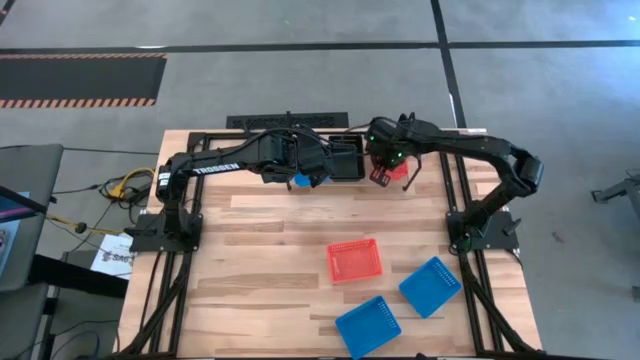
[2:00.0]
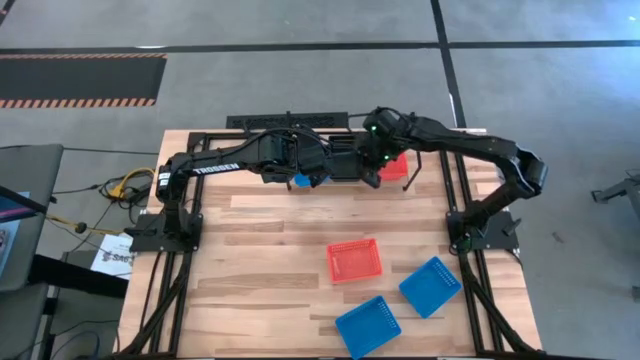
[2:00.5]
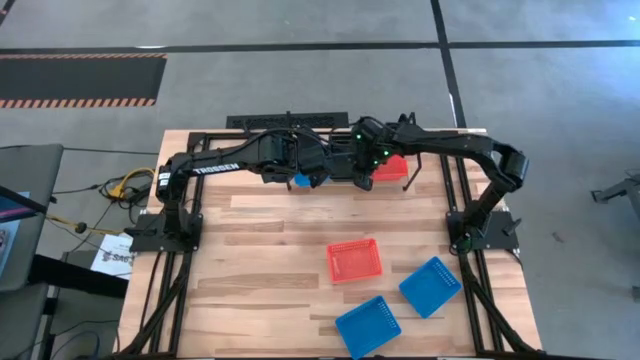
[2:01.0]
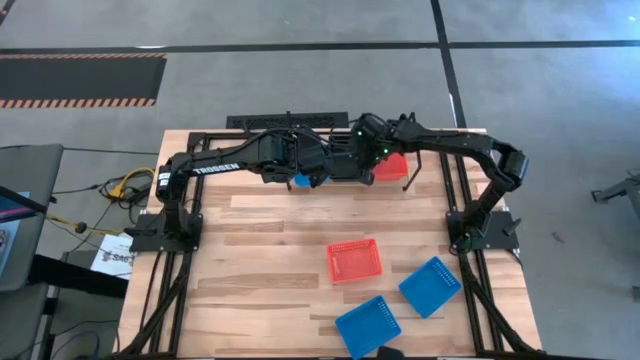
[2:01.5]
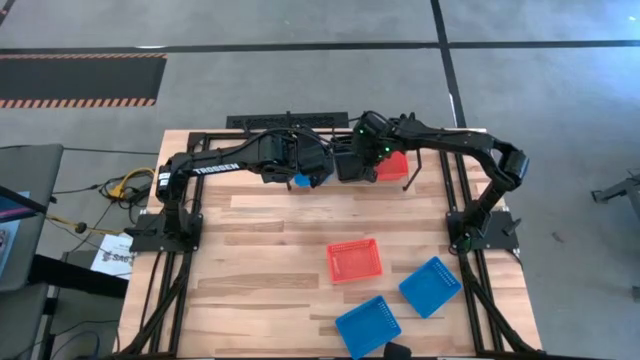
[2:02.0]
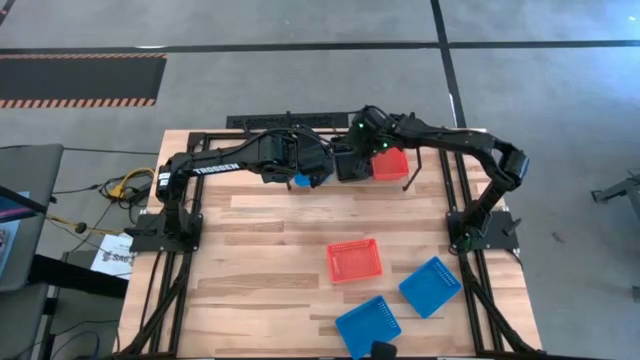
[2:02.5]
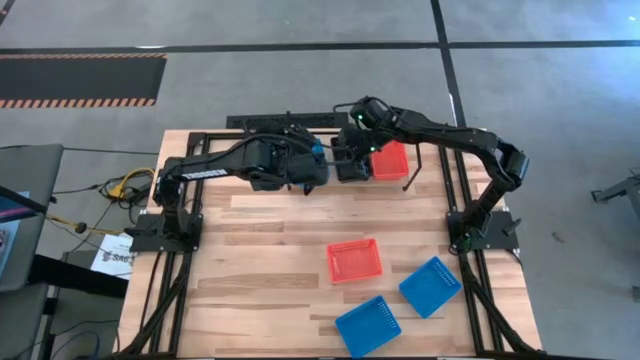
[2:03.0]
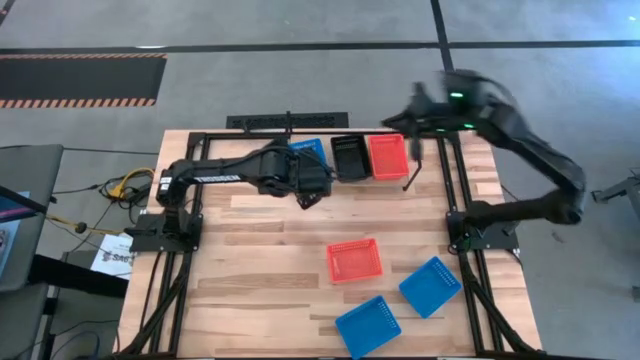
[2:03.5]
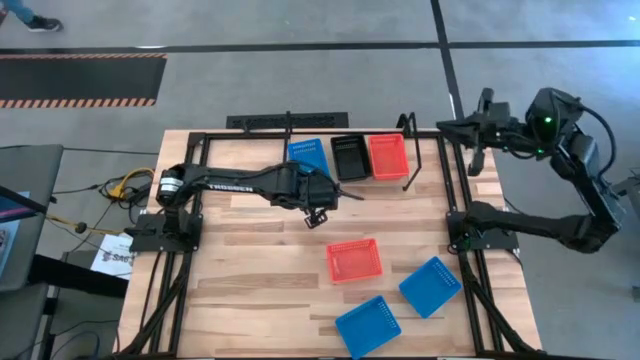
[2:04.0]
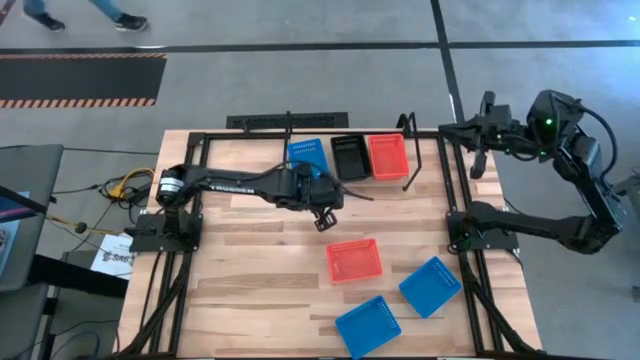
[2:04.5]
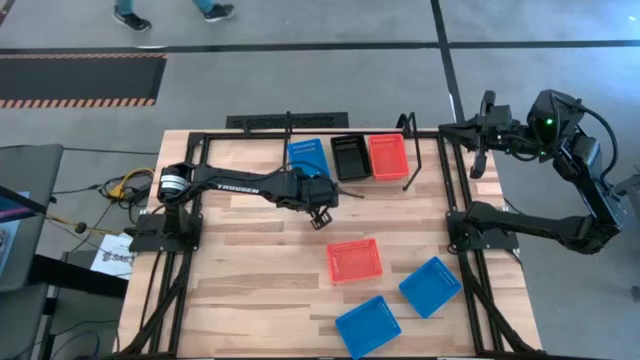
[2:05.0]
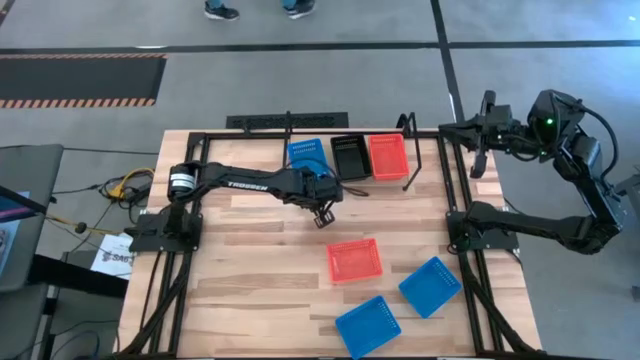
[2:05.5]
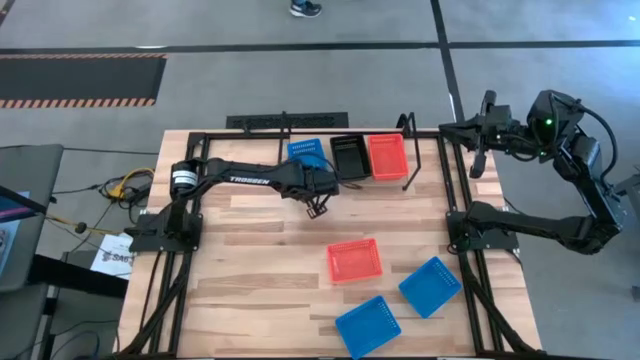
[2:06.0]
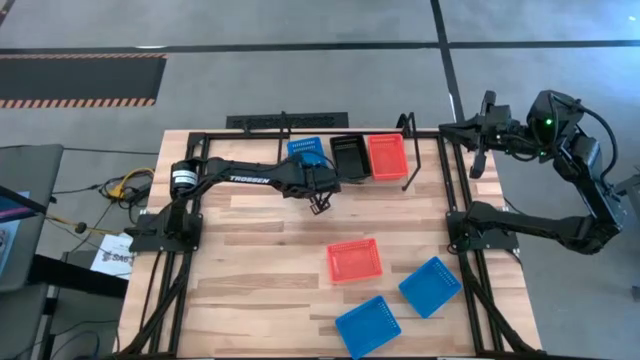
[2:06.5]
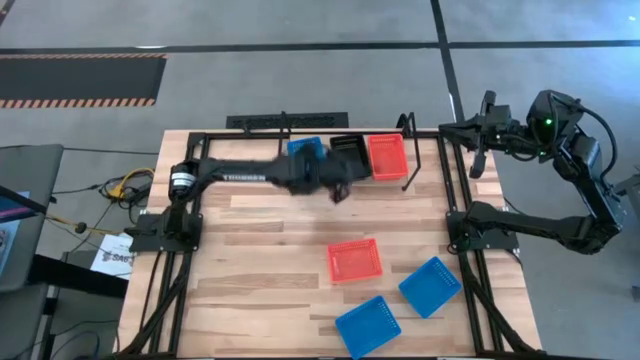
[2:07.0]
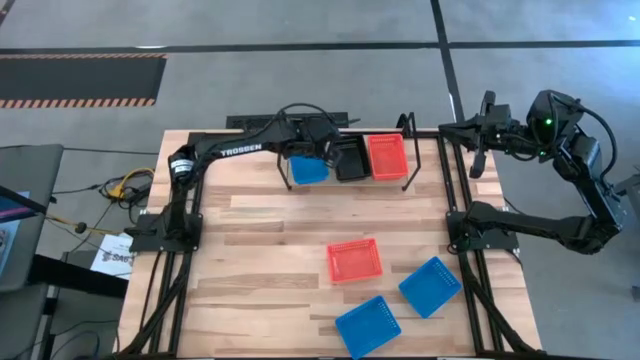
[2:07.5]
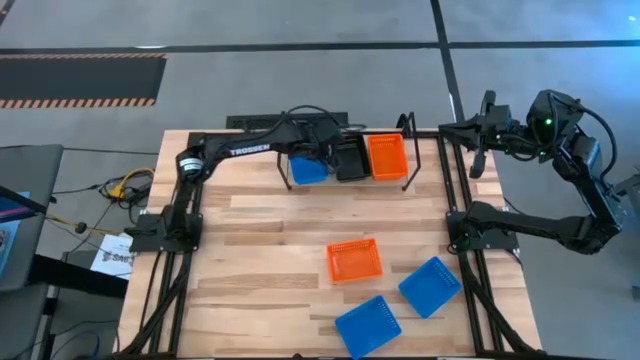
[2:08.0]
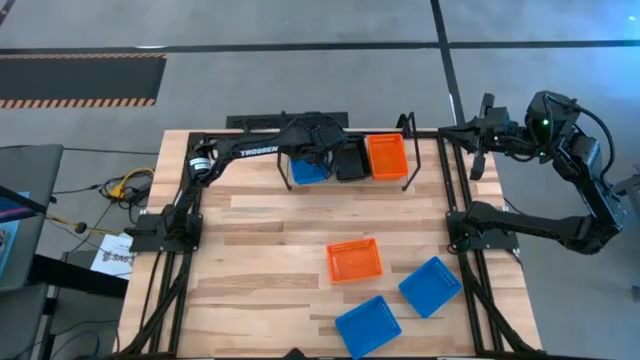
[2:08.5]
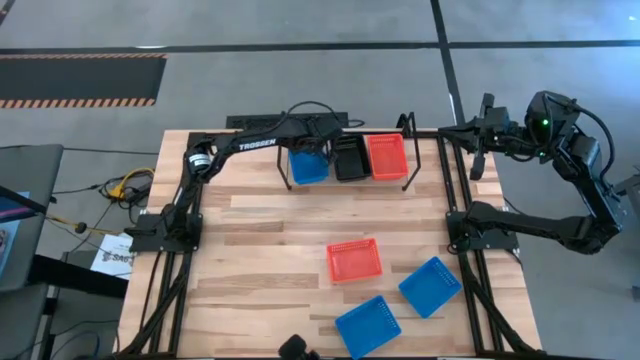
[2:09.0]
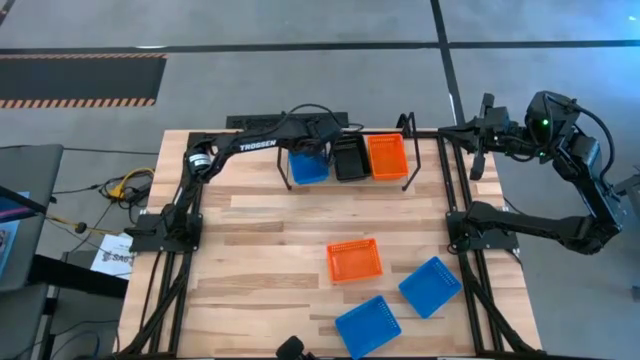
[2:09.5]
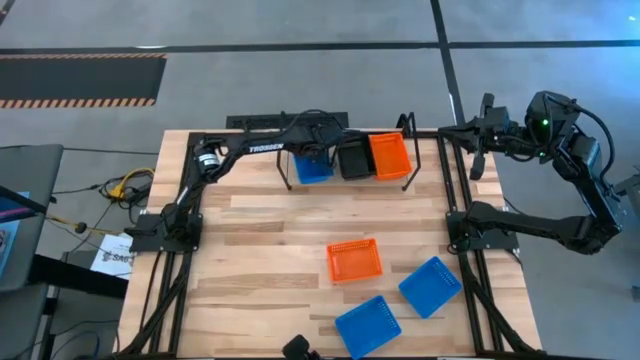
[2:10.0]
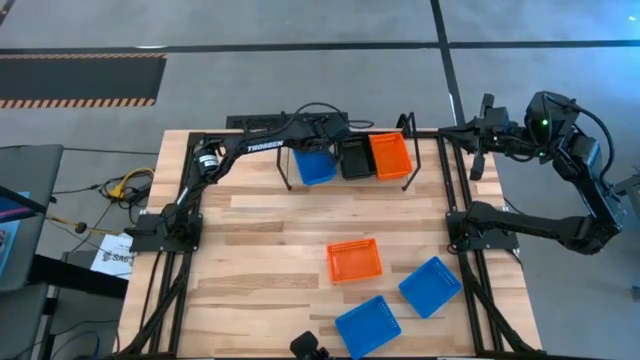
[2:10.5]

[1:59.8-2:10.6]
Task: Stack baskets on shelf by color
Adjust the bins on the shelf

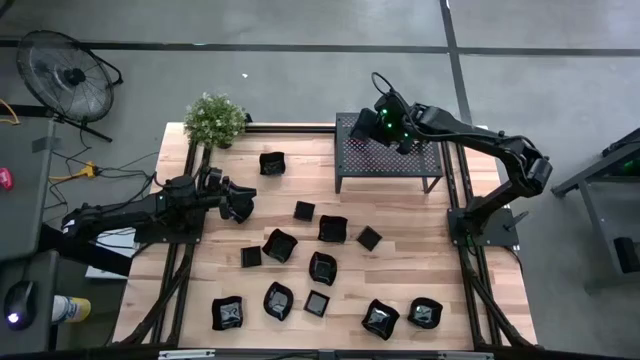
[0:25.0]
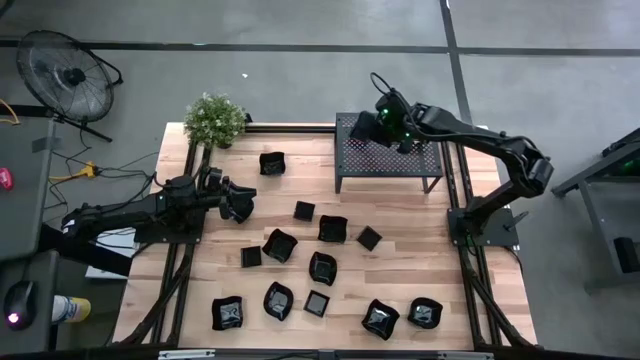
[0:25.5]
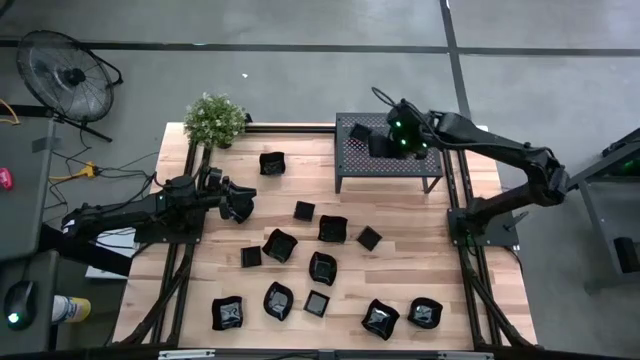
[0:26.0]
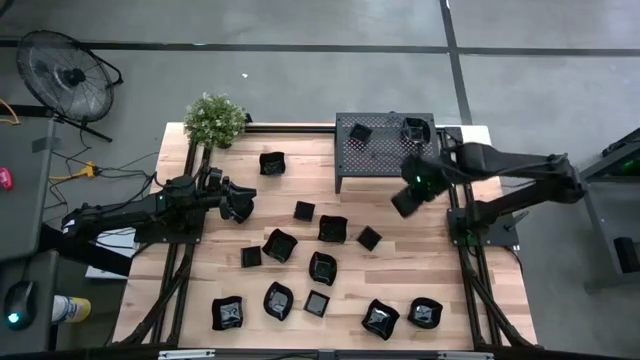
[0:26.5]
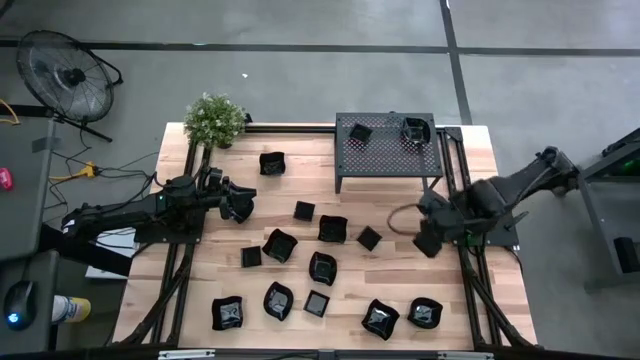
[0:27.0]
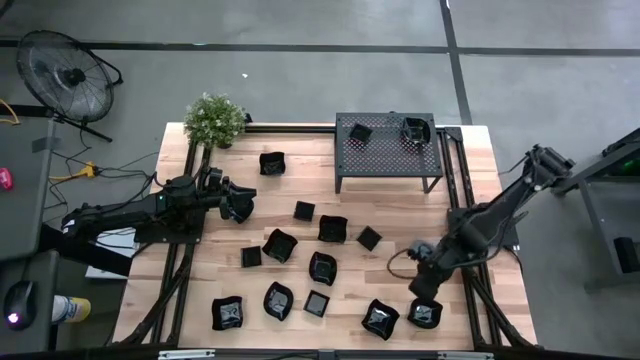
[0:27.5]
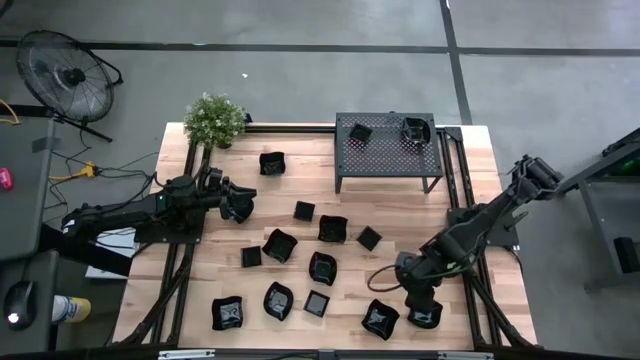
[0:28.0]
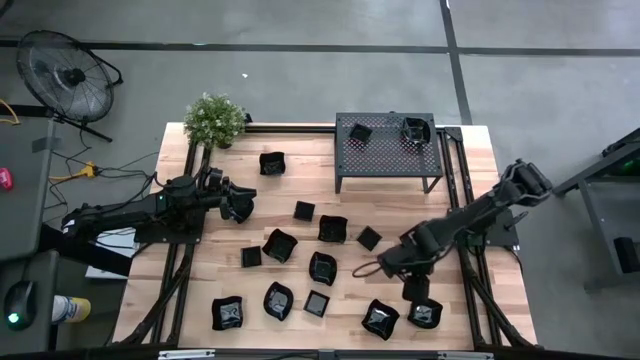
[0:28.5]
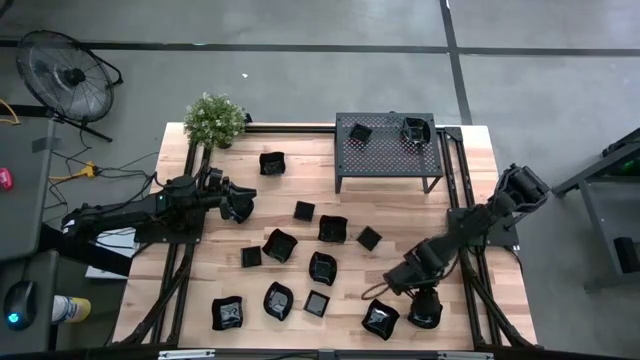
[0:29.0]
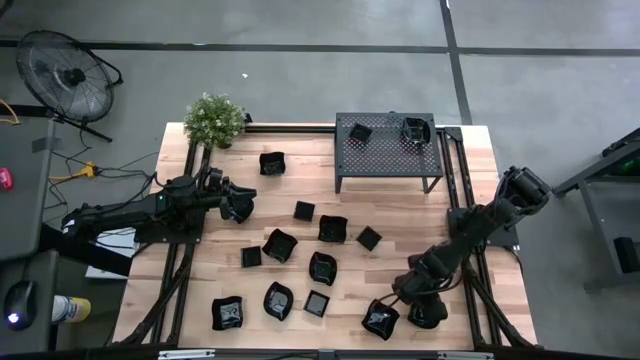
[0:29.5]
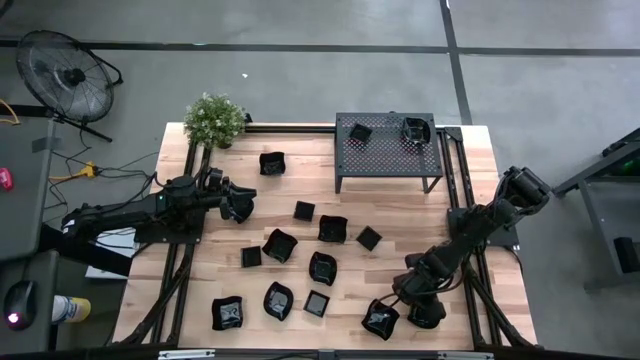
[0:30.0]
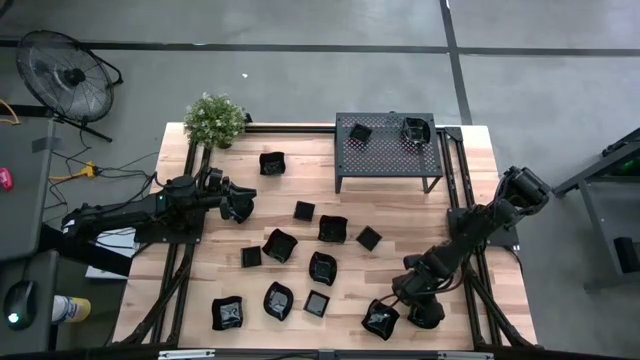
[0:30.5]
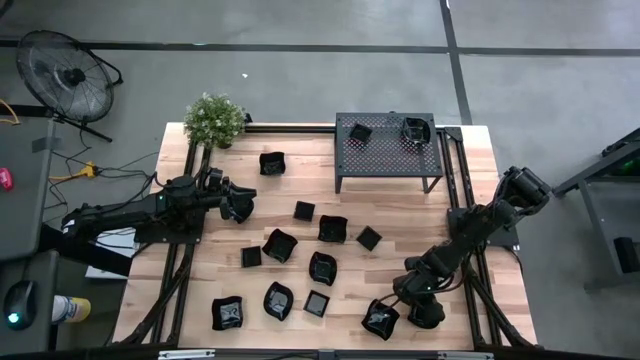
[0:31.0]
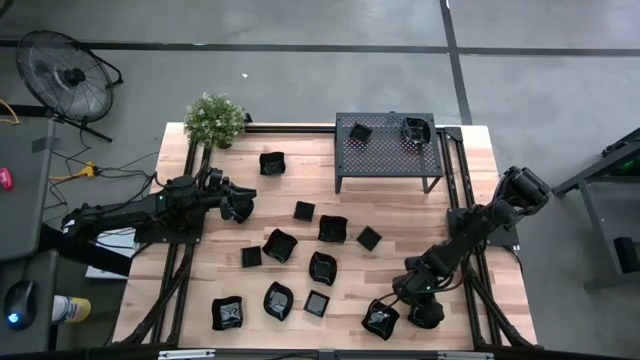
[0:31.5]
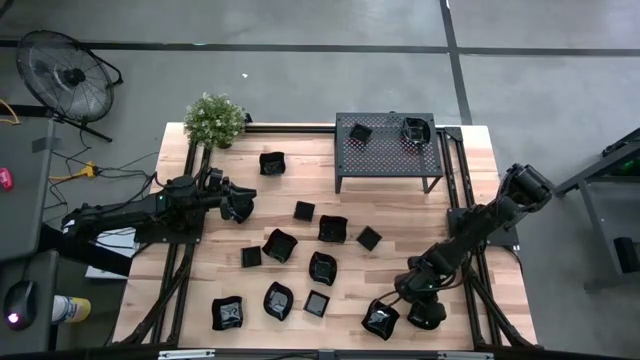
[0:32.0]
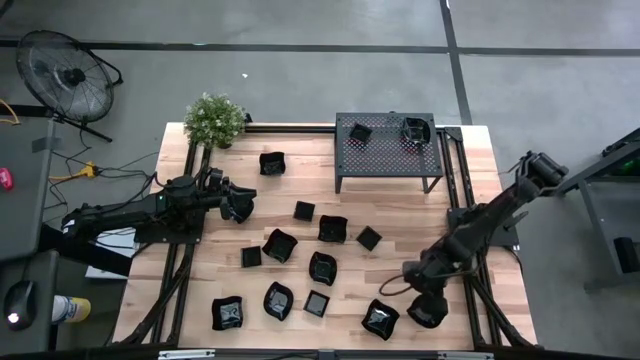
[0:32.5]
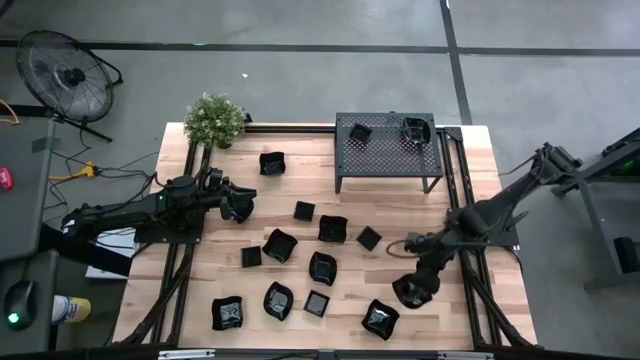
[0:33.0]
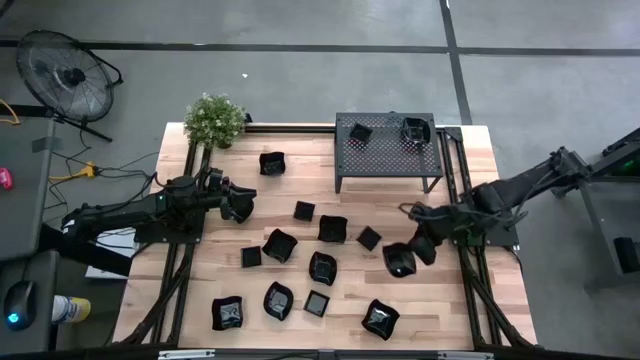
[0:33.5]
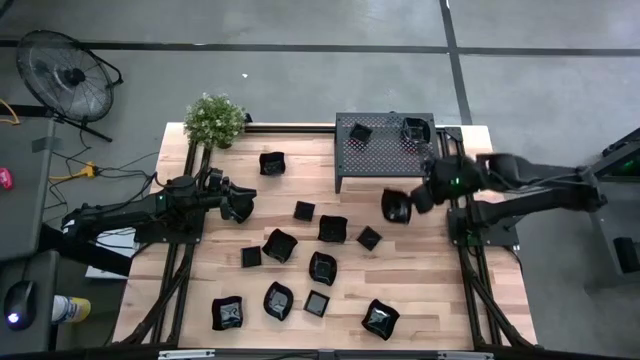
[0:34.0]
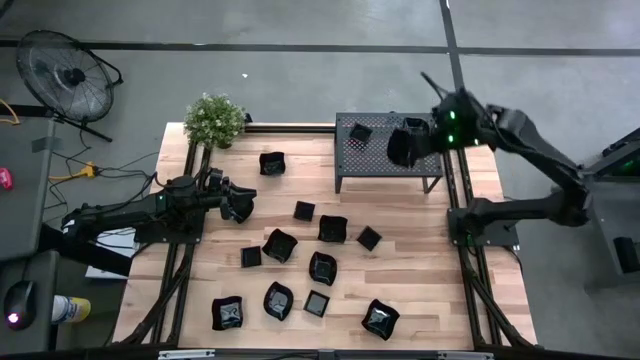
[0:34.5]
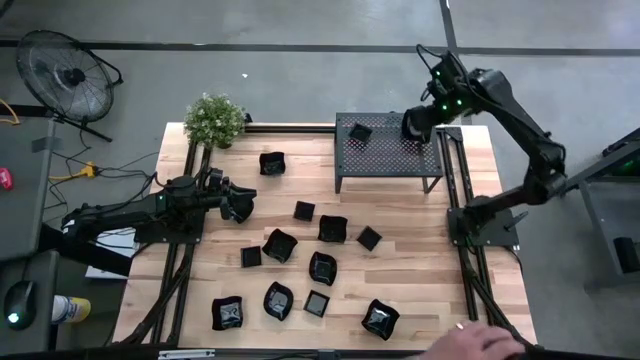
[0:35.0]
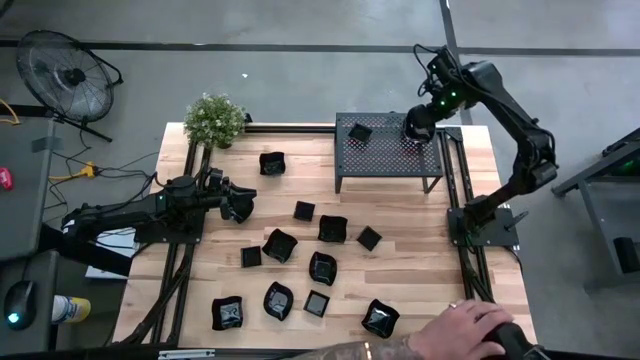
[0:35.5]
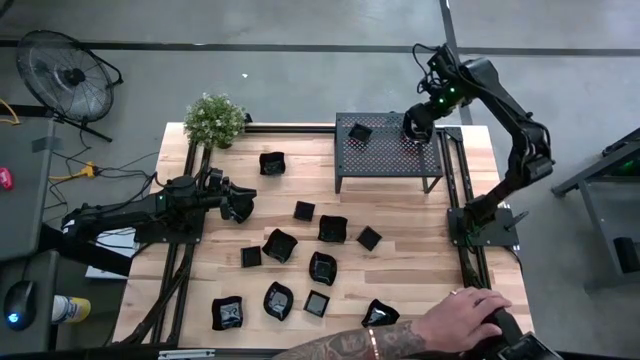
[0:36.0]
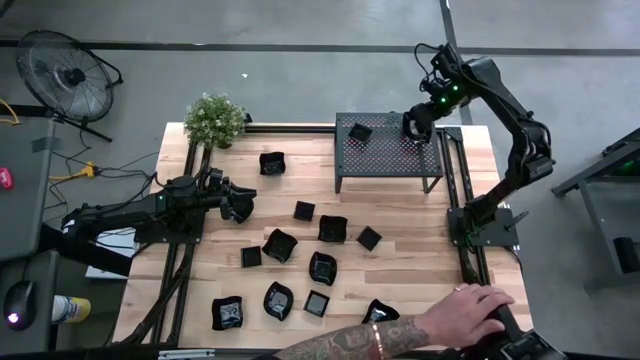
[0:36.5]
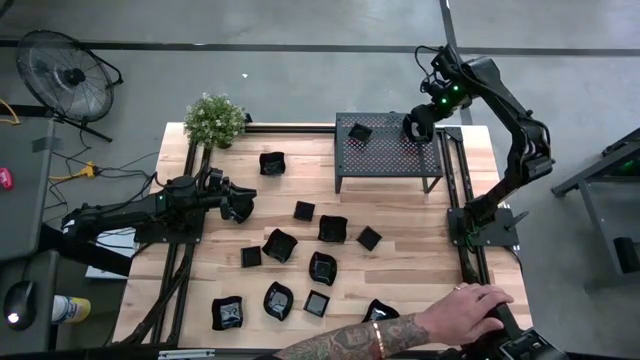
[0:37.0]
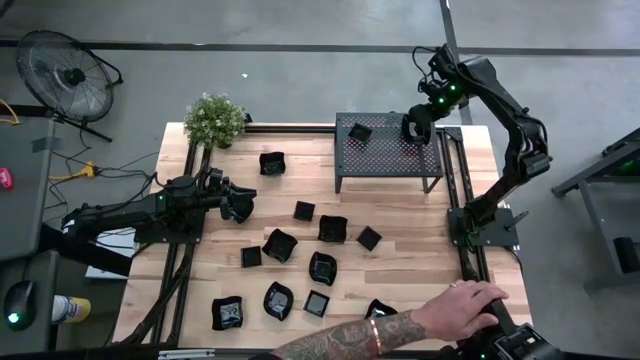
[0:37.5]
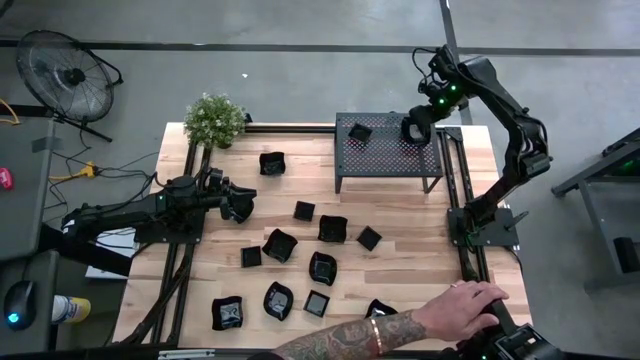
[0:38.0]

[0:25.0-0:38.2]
Task: Pick & Place Mini shaped plates
Stack the black leaf-shaped plate on top of the black leaf-shaped plate on the shelf
